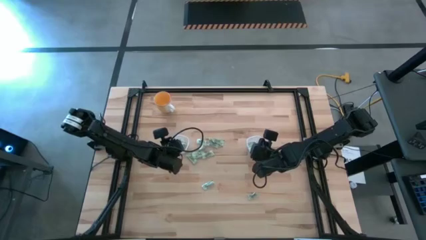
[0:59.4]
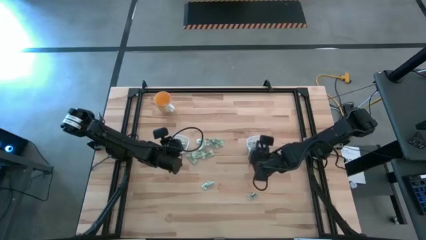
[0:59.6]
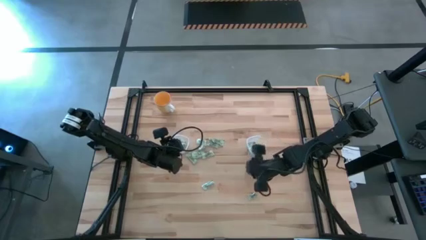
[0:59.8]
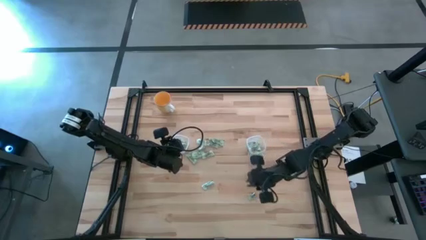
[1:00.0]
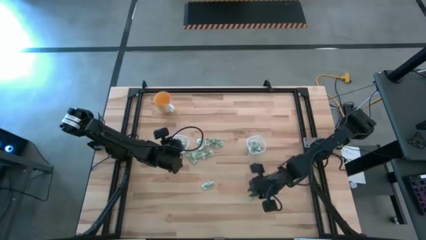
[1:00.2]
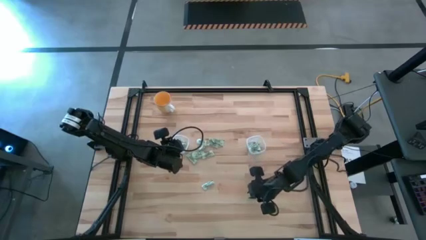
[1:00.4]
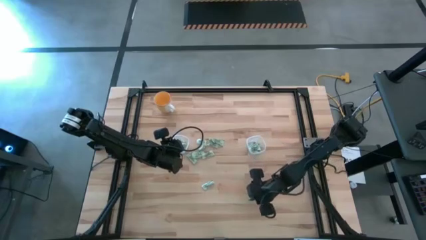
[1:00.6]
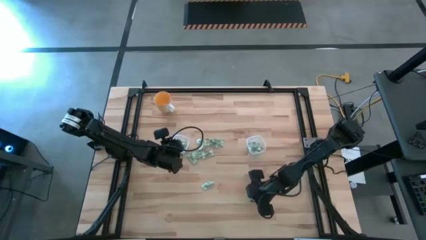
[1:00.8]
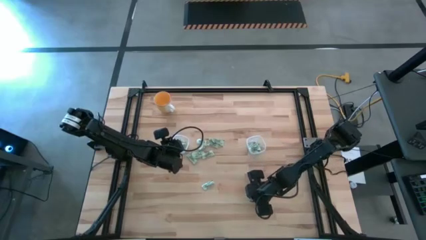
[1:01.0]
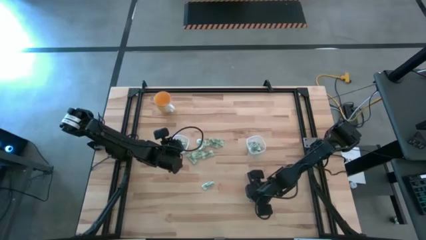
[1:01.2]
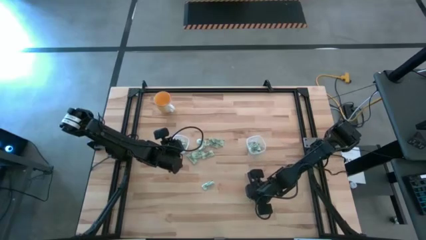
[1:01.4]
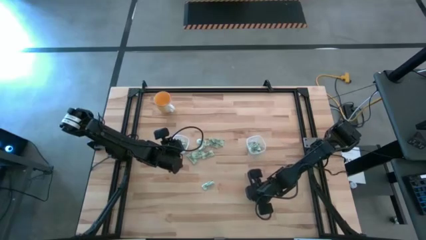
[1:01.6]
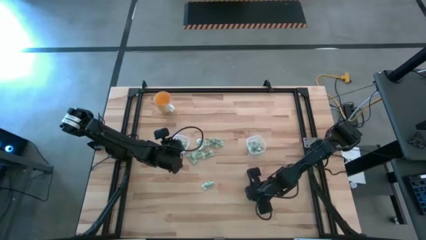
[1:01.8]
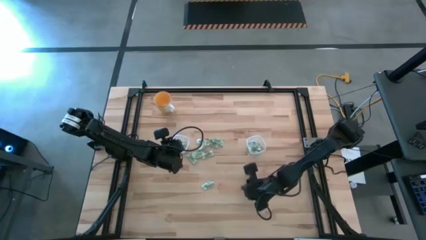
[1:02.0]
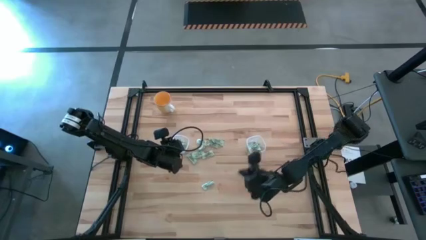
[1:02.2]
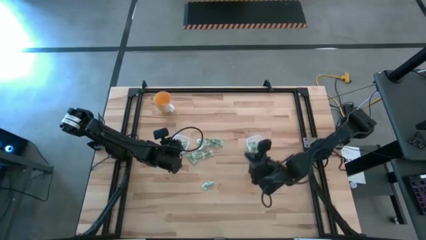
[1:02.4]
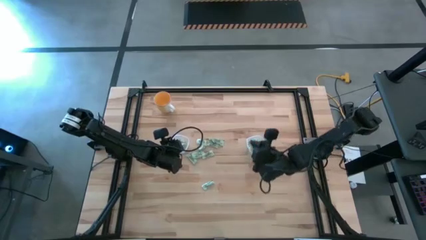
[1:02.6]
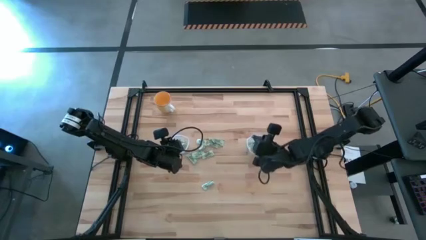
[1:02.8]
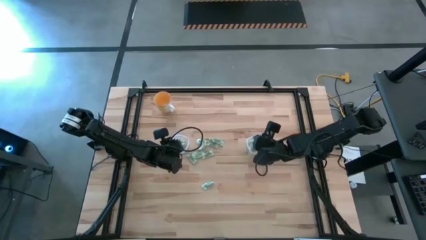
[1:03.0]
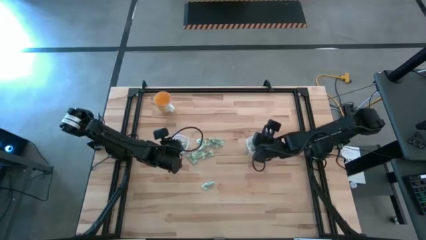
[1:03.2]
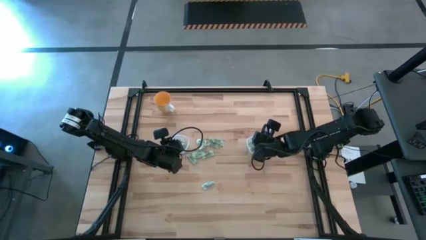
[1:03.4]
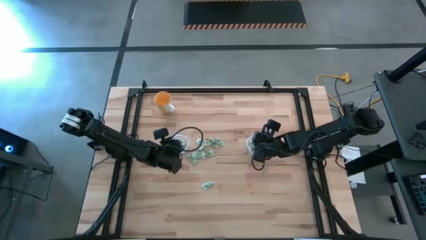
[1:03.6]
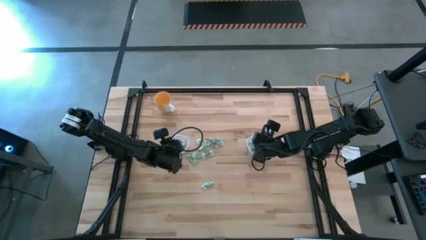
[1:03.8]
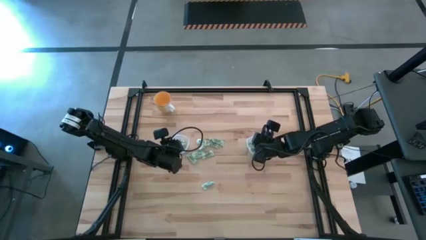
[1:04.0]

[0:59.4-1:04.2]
Task: Pick and place Stevia / Truvia into bins
Put the stevia packet into the right transparent container

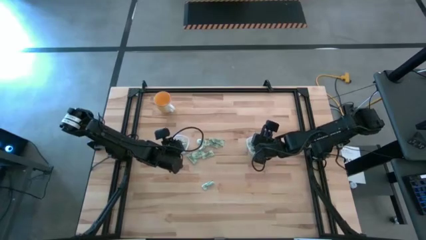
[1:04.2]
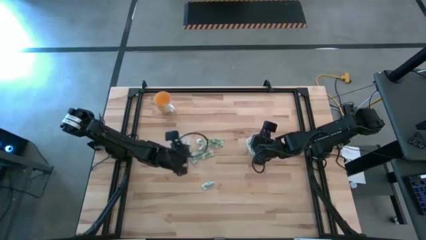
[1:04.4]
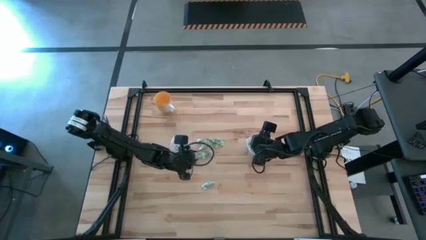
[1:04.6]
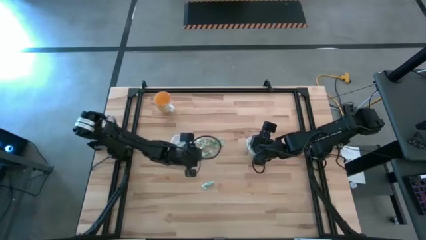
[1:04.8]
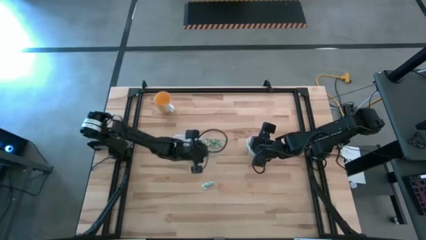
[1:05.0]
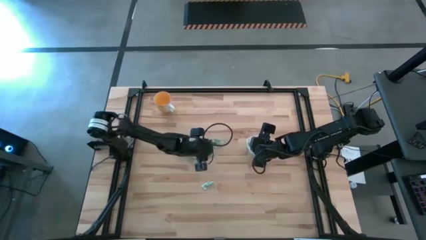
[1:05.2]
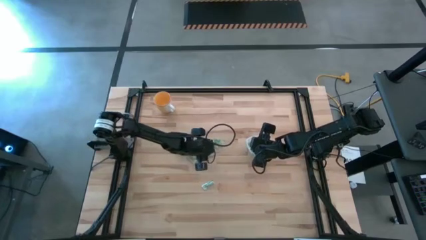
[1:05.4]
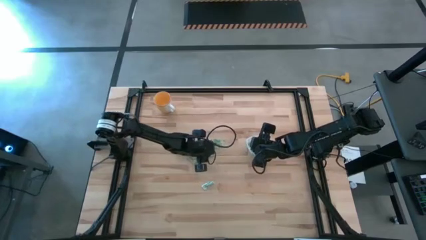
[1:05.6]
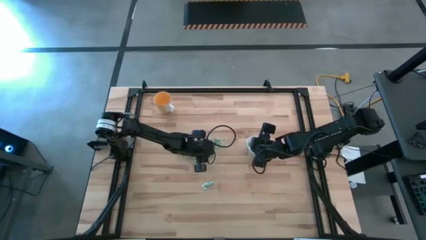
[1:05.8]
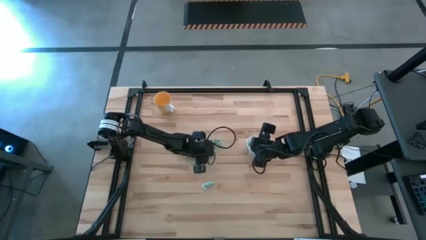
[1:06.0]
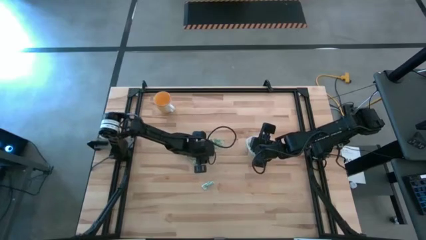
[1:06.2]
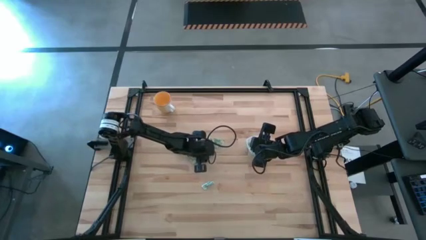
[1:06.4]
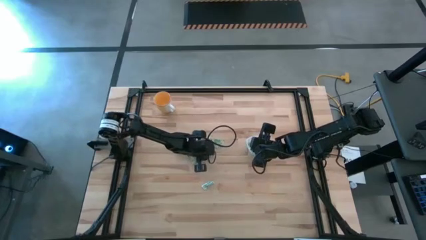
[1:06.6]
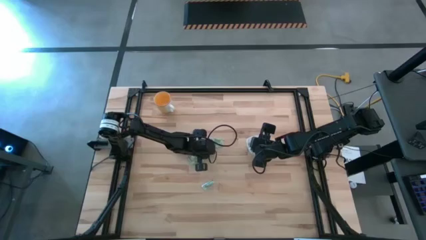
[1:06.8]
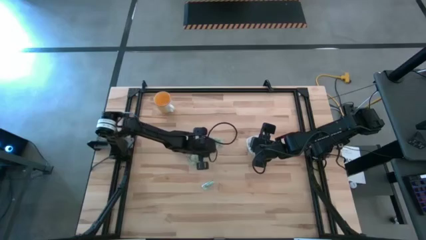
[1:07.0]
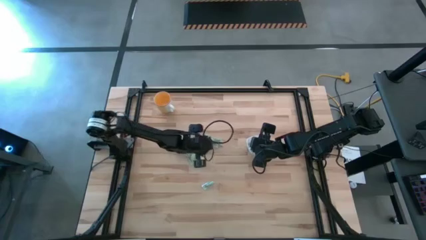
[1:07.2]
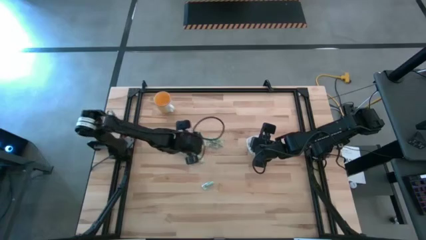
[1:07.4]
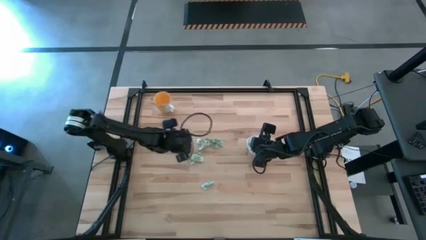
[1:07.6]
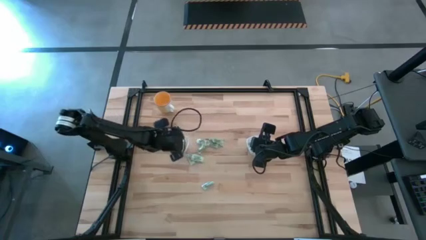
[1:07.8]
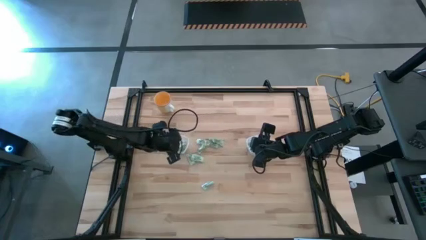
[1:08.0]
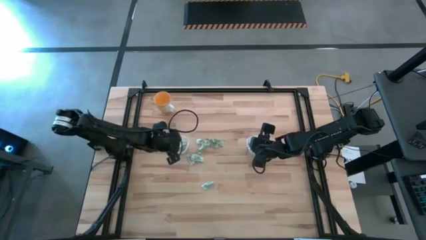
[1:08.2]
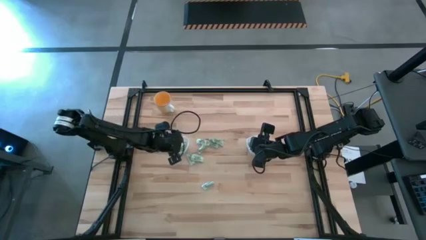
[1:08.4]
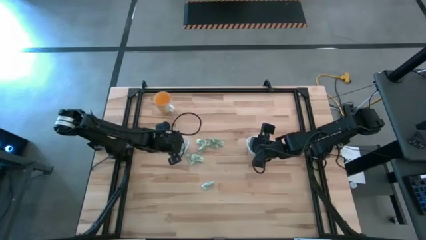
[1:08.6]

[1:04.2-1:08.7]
Put the stevia packet into the left transparent container

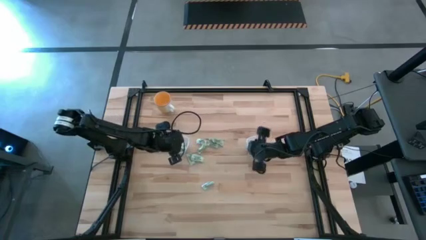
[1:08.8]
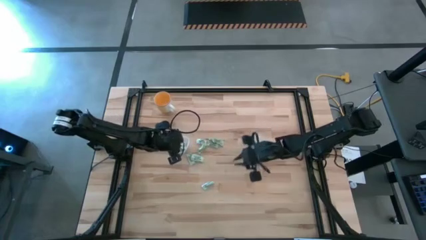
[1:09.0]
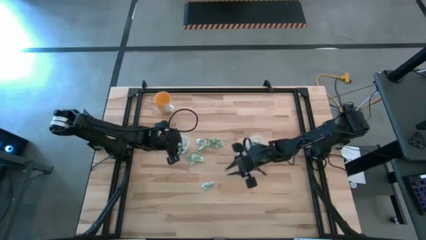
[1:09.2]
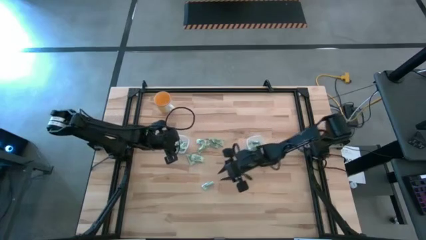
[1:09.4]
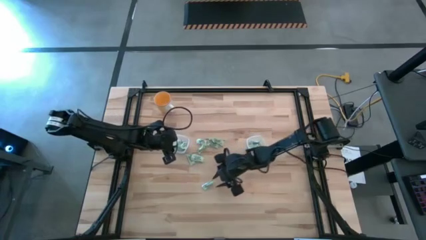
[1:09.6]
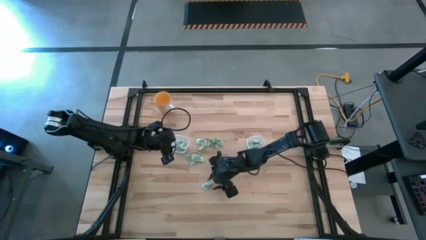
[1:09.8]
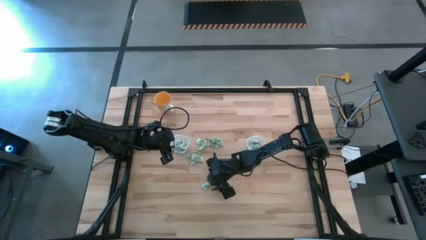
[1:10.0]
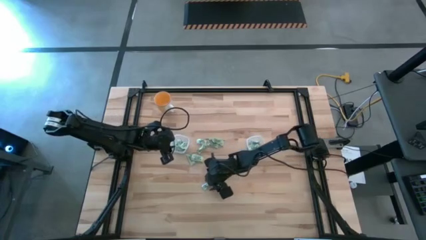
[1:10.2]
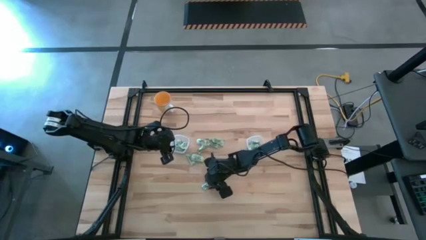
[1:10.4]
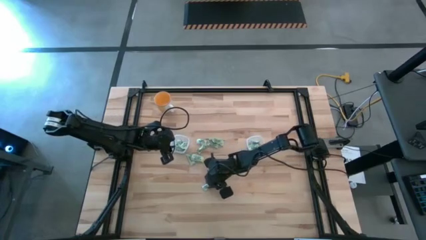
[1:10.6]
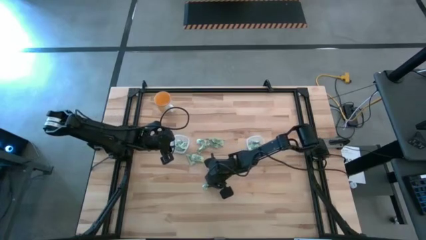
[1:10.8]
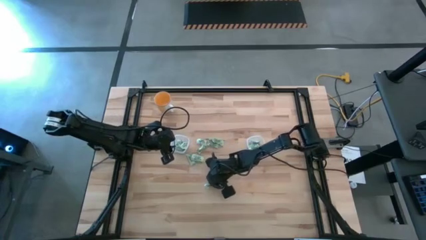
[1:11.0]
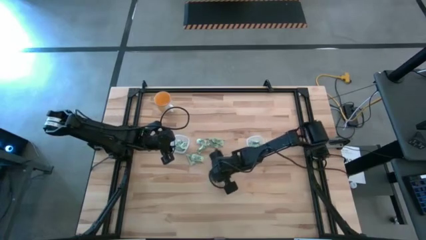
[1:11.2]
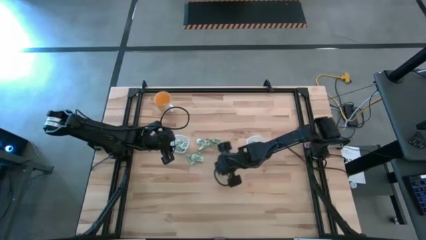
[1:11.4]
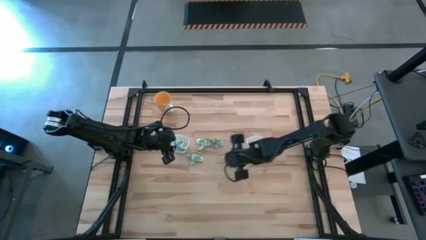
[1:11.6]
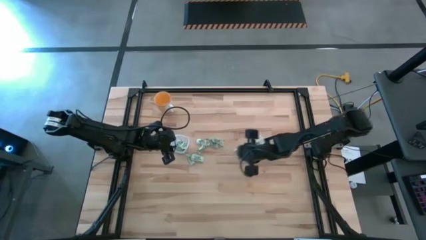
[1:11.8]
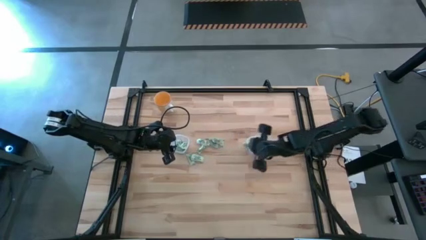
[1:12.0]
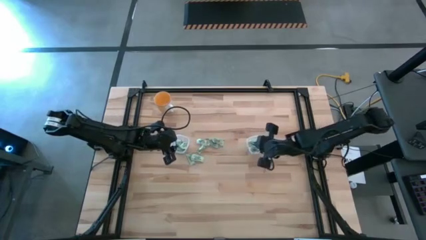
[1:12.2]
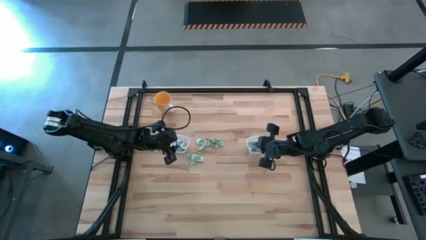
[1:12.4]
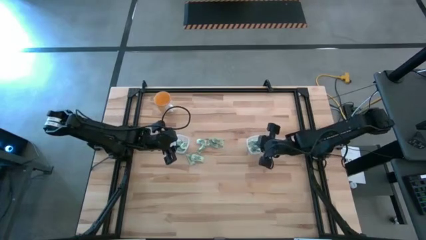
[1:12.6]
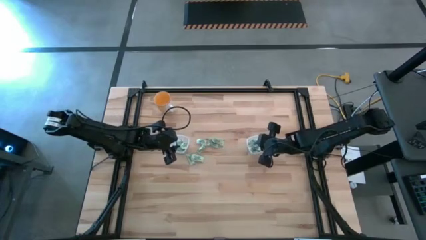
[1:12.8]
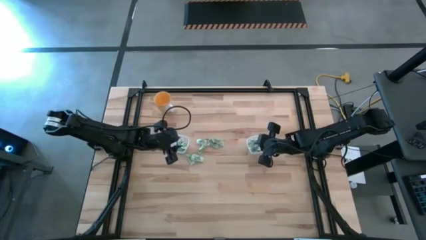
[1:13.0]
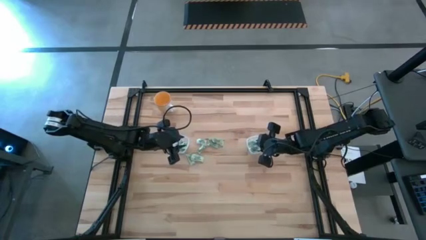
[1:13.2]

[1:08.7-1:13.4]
Put the stevia packet into the right transparent container

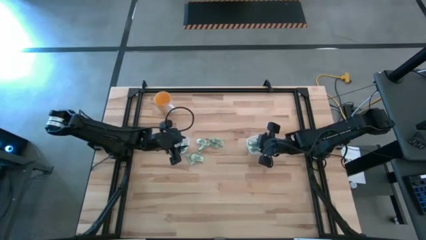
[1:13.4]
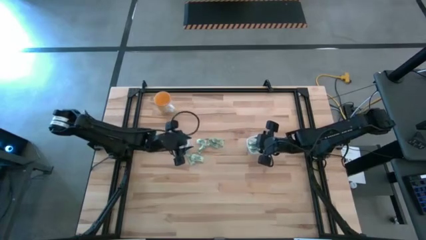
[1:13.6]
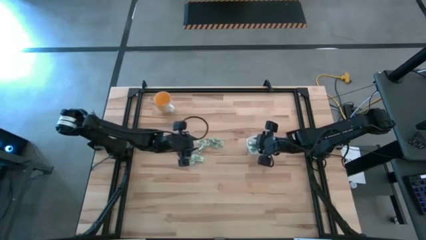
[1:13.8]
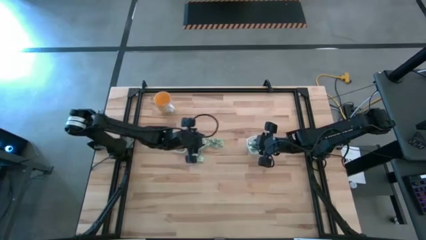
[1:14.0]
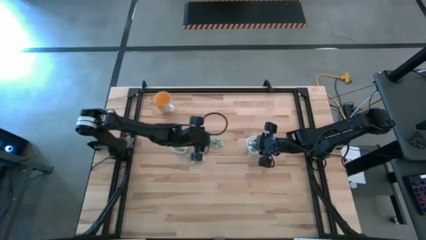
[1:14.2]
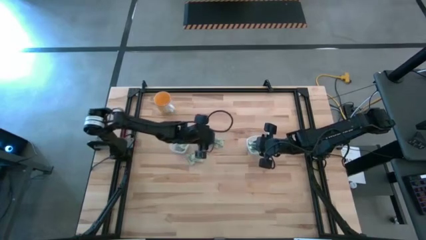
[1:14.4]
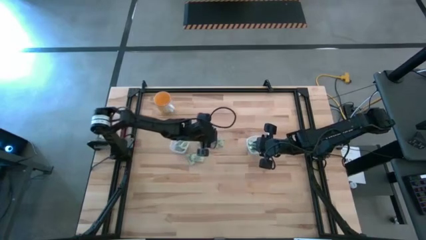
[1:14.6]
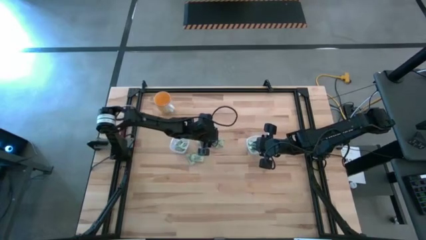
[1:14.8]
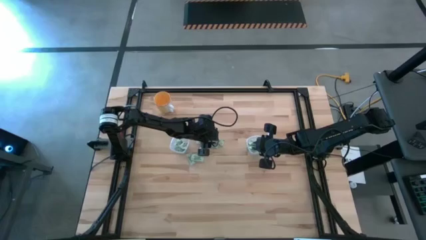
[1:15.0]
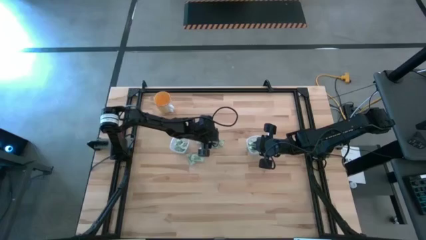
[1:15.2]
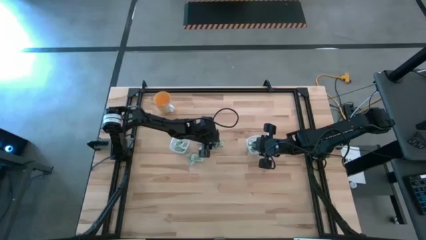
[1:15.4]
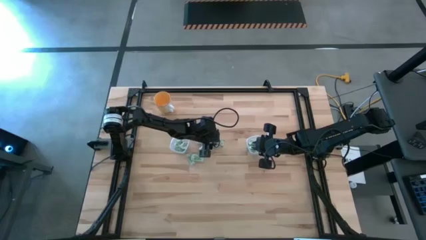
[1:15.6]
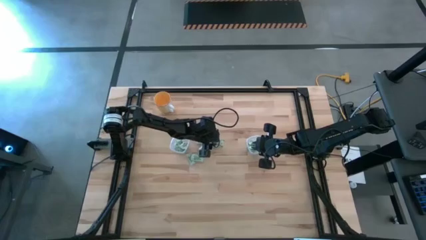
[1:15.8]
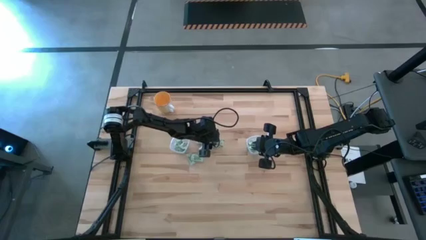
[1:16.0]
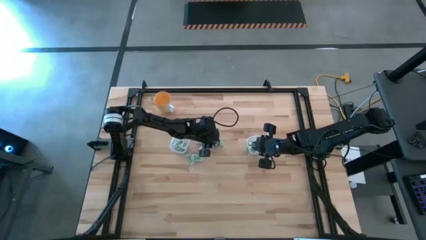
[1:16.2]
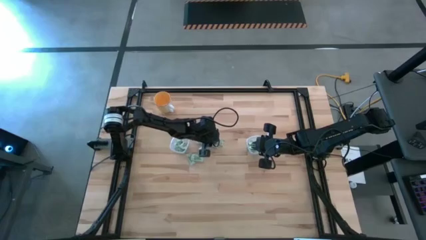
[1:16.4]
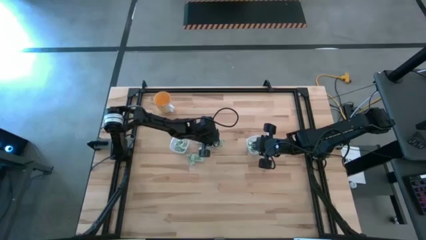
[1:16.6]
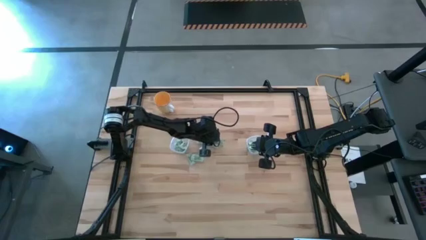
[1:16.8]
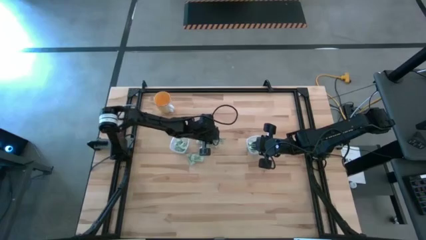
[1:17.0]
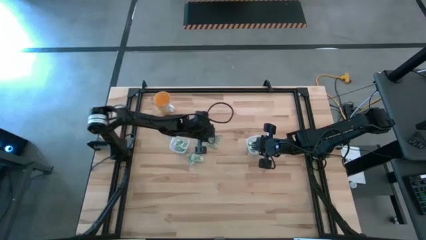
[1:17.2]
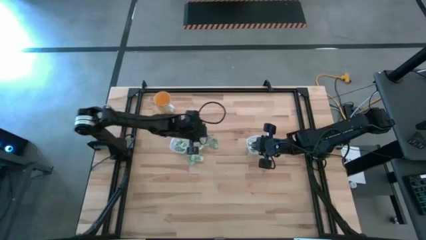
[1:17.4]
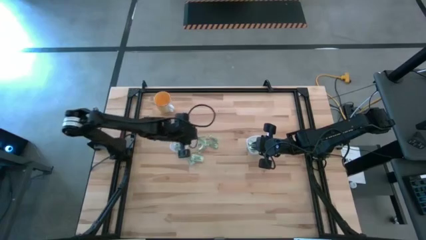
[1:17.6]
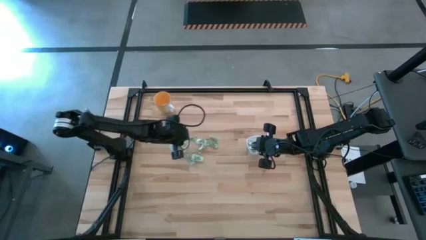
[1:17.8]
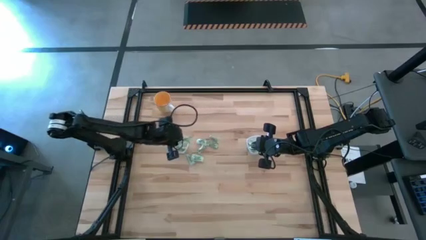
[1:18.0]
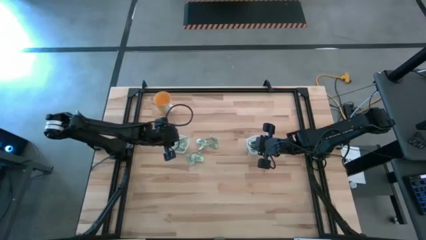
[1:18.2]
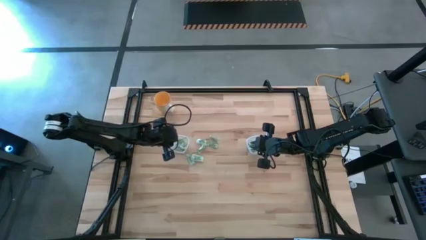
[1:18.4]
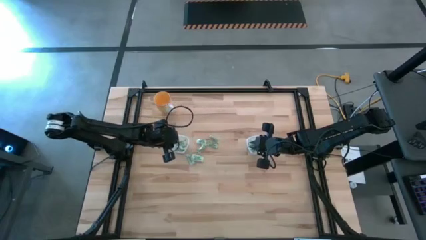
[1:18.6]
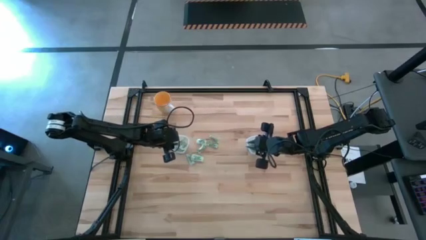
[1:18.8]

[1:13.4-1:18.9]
Put the stevia packet into the left transparent container
